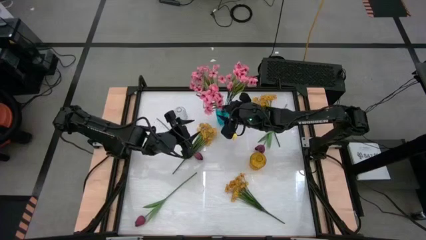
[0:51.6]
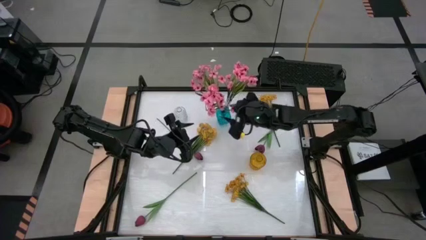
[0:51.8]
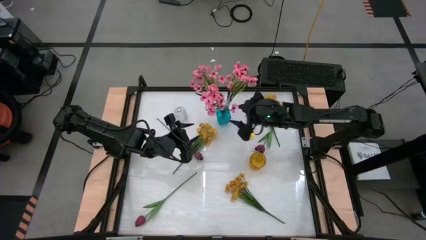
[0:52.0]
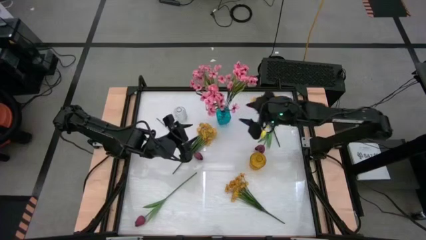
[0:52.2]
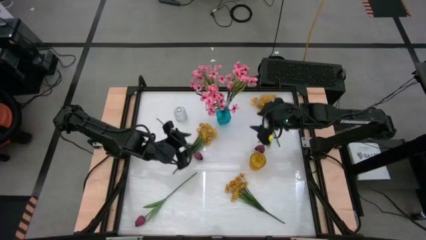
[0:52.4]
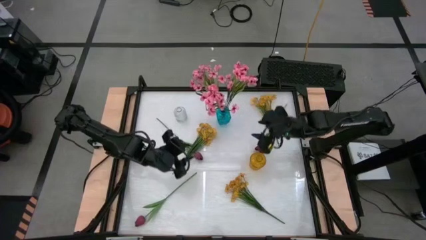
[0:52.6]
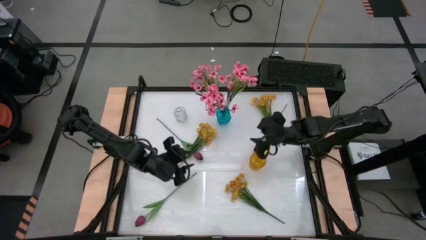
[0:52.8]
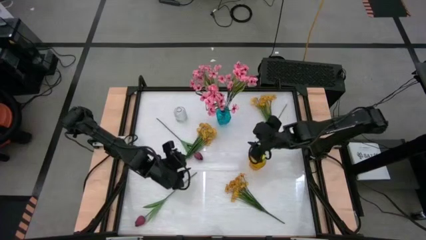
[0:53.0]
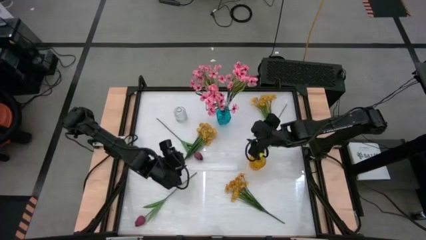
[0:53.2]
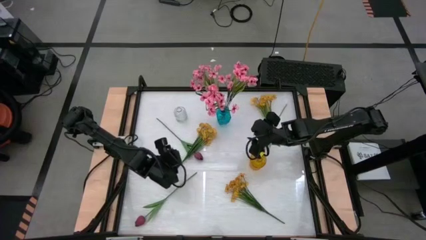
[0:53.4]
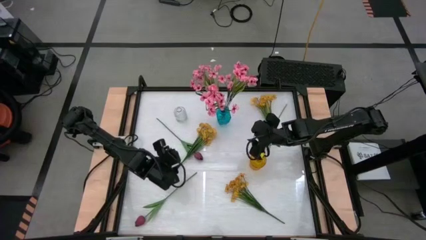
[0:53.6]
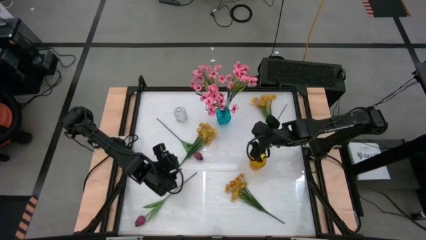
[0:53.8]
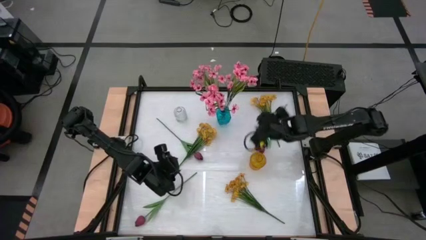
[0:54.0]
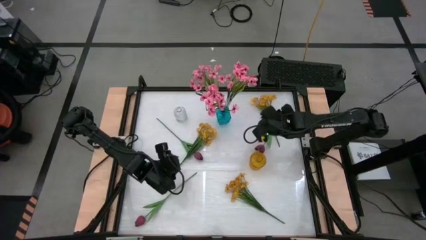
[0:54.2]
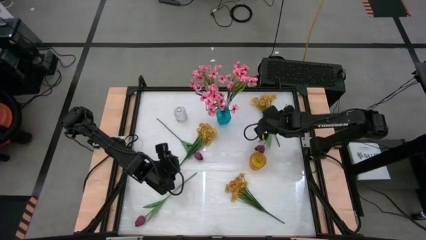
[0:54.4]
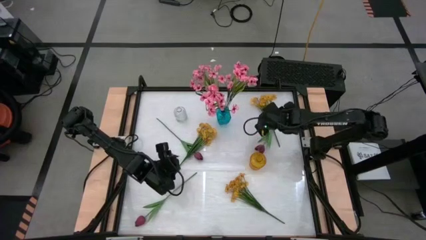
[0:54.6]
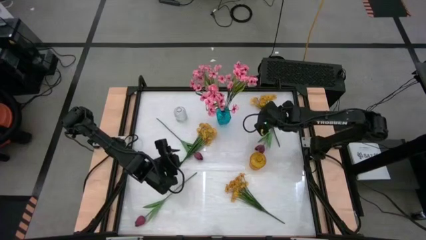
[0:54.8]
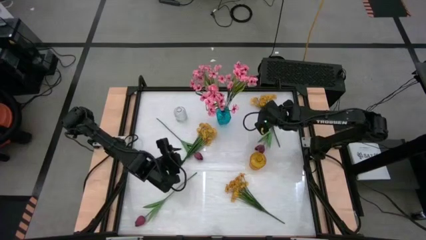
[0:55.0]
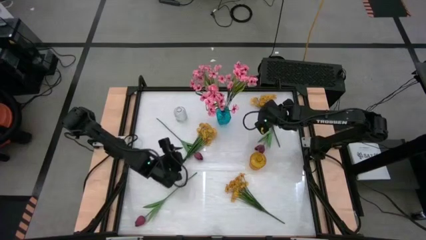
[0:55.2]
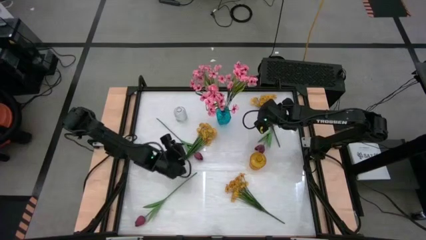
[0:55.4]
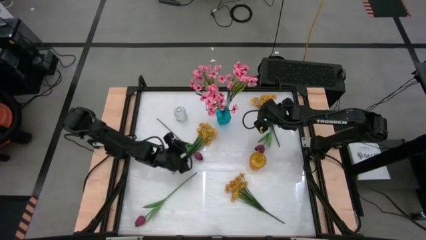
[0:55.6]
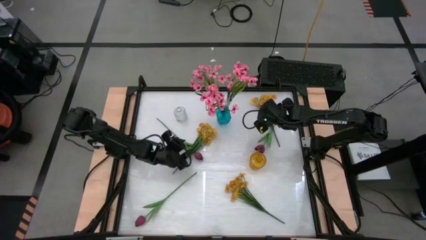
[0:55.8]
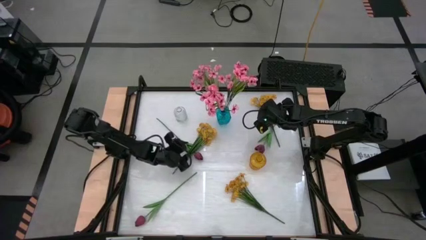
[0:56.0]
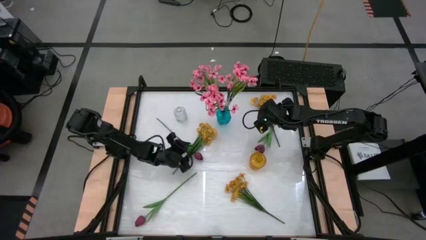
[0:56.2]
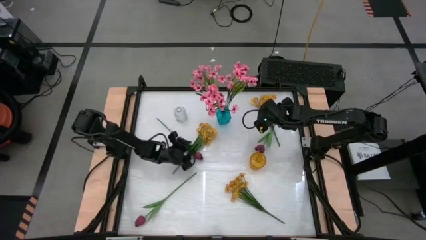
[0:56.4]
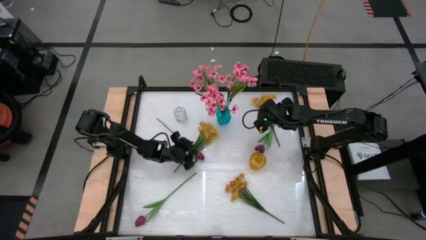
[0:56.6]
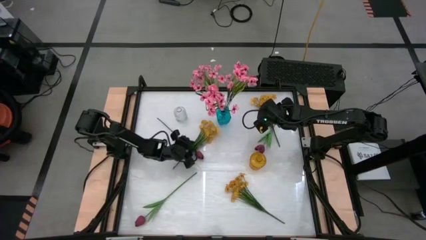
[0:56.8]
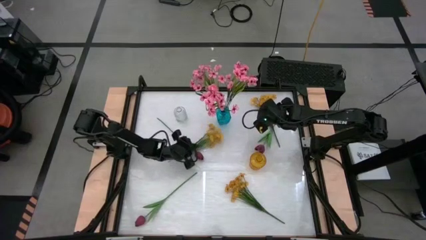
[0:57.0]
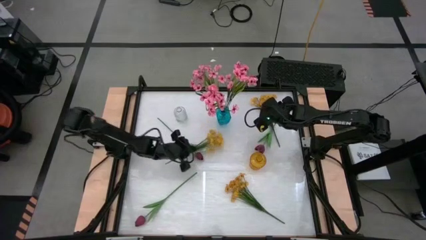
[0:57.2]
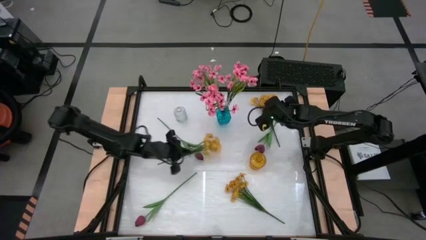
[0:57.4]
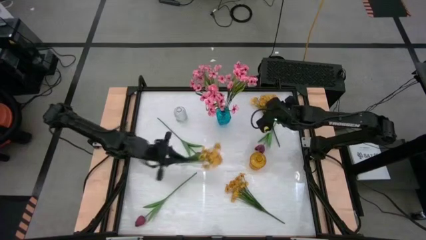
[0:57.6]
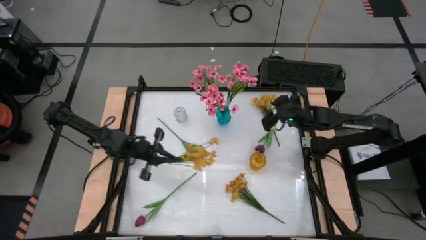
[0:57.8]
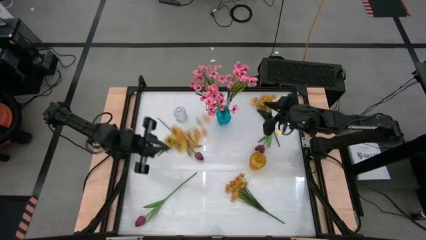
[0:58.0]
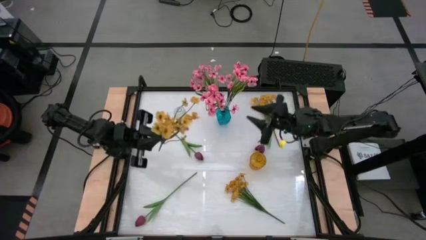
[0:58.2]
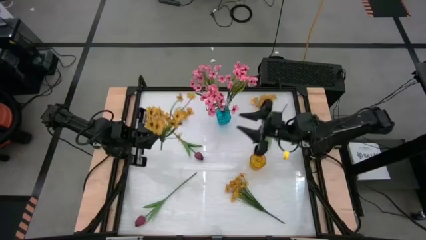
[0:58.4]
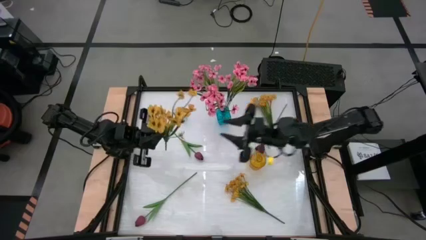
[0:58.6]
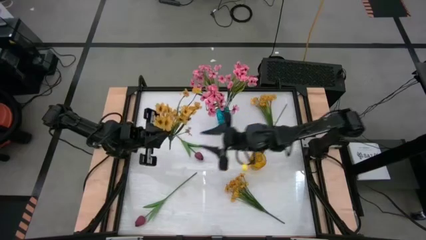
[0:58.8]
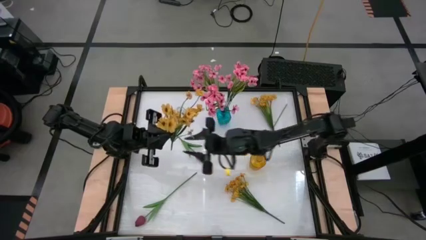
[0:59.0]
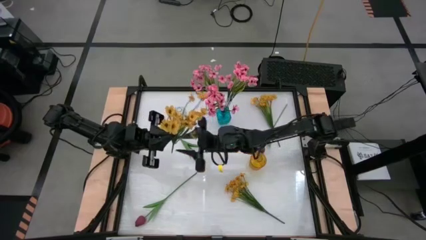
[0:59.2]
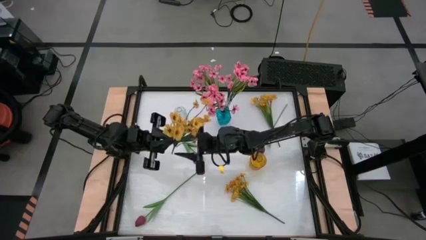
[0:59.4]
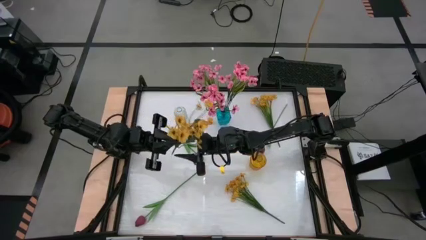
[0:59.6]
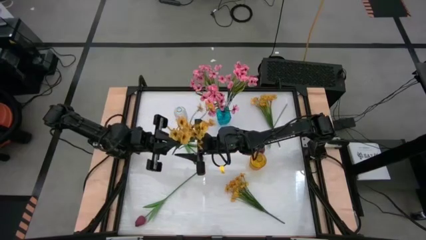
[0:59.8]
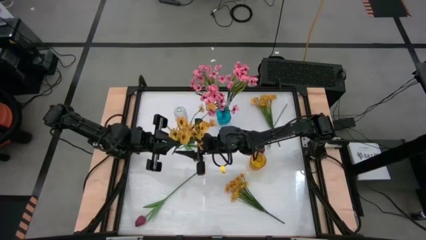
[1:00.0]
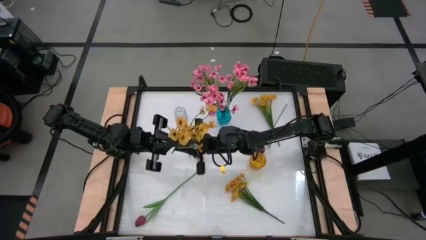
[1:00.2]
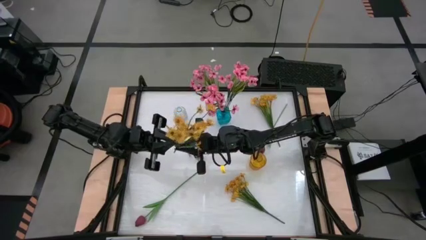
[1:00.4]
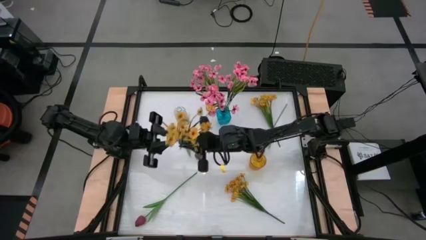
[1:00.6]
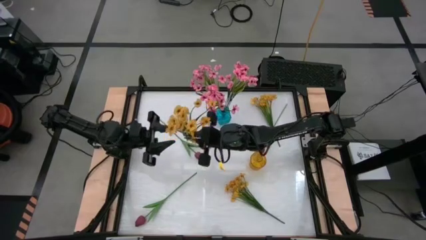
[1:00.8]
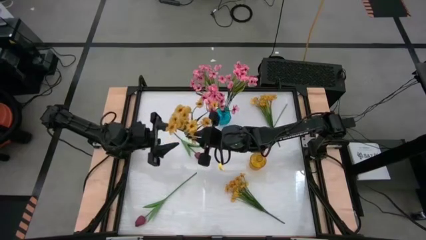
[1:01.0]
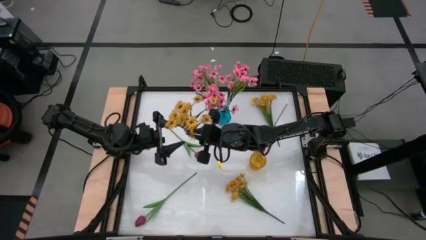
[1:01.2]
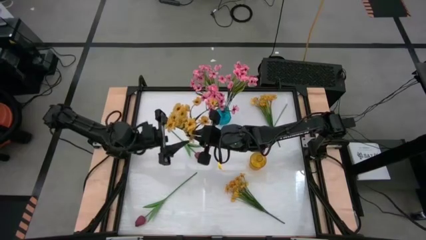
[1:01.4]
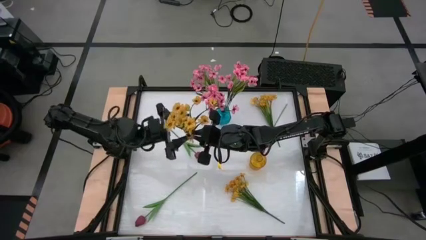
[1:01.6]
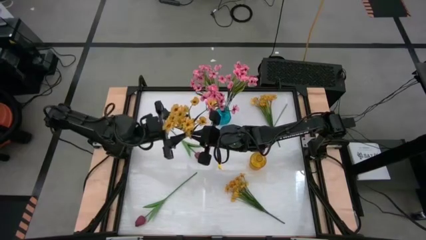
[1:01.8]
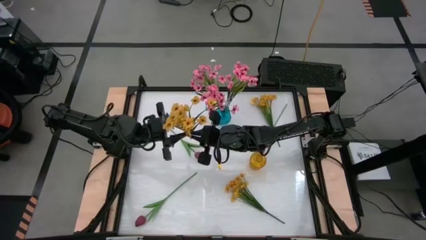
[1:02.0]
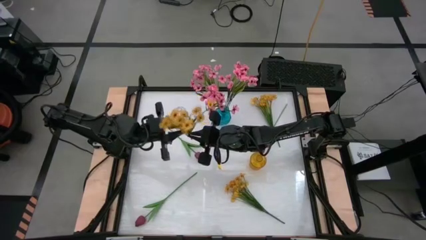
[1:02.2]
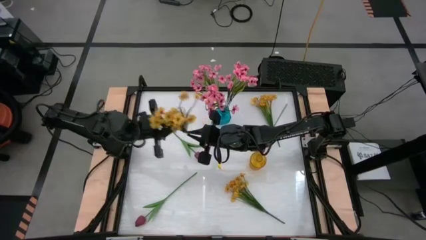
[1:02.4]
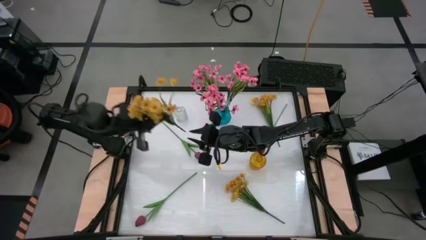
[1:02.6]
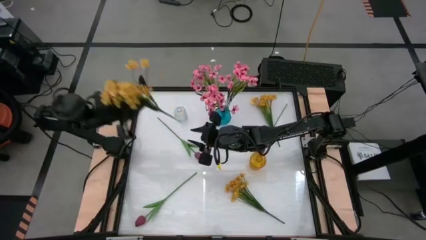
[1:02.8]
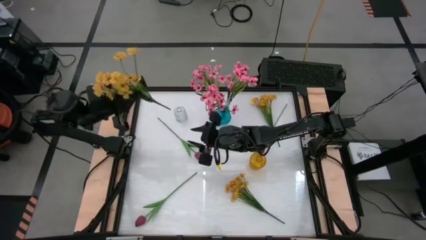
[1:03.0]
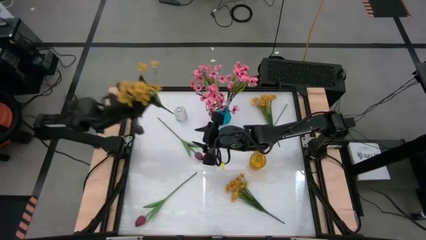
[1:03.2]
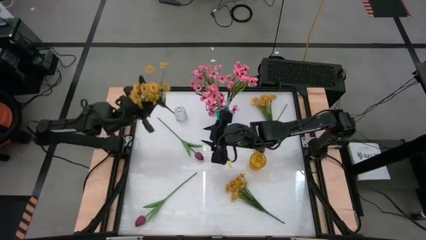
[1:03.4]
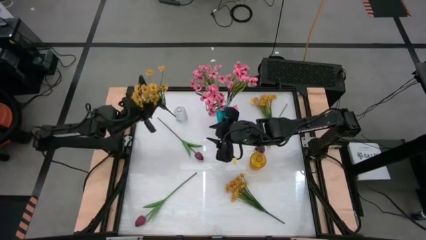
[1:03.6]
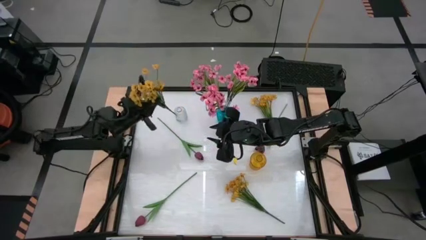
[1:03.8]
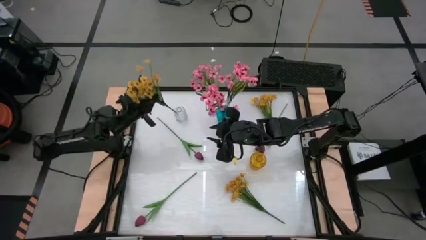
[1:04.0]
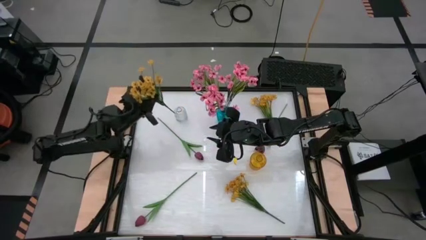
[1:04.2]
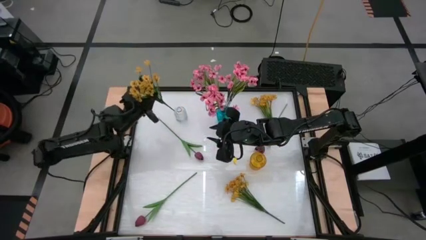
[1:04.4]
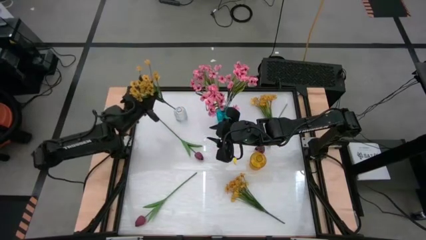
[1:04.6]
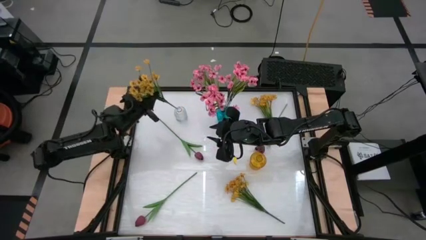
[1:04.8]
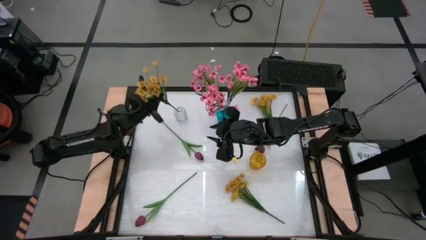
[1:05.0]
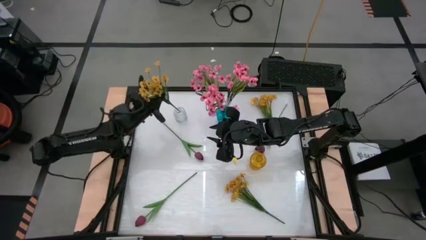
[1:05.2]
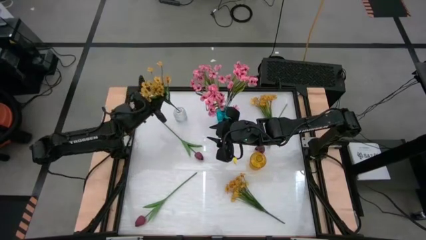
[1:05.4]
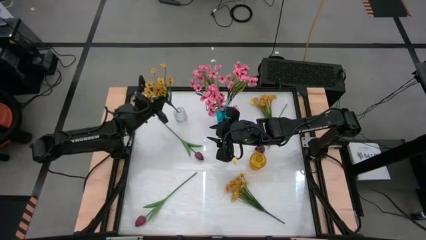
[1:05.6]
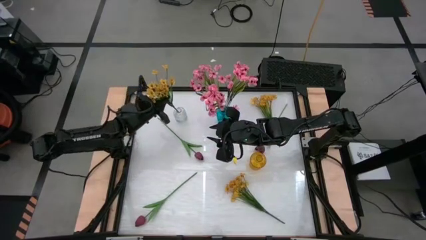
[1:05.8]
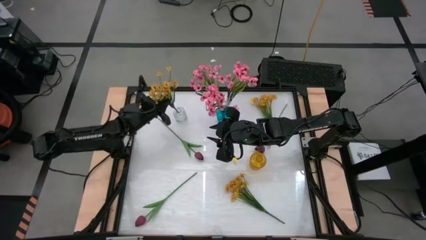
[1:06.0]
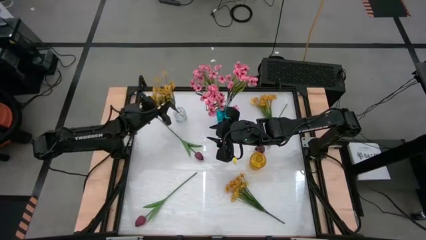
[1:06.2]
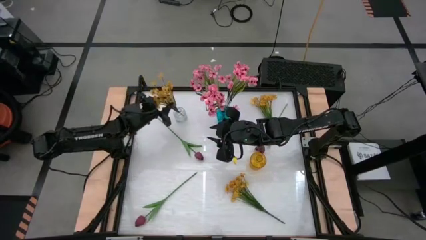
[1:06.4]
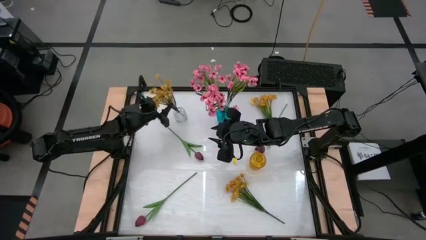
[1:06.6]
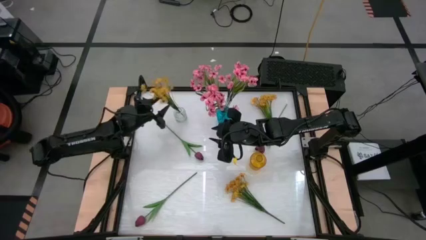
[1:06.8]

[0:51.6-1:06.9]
Task: Sort flowers into vase by color
Put the middle yellow flowers into the transparent vase
